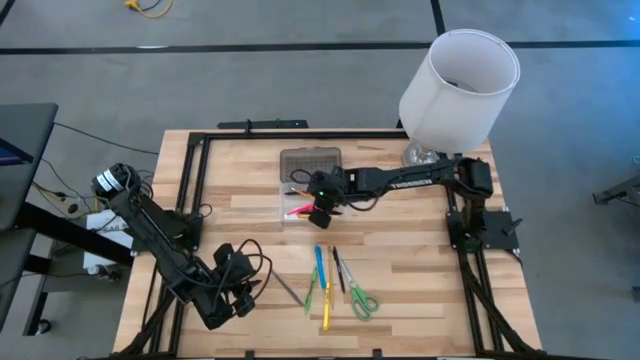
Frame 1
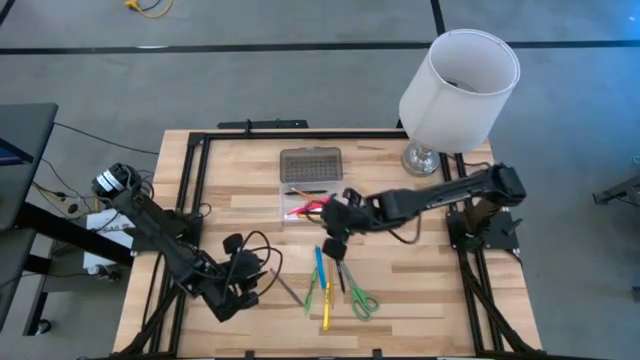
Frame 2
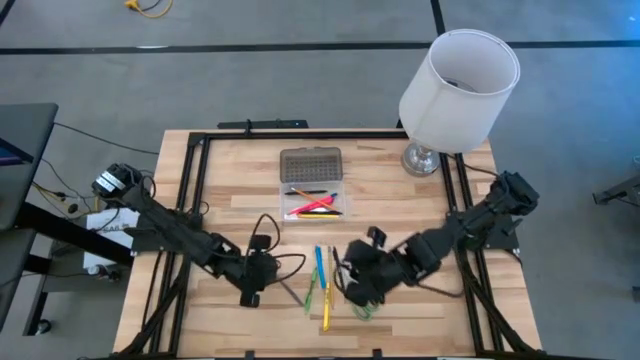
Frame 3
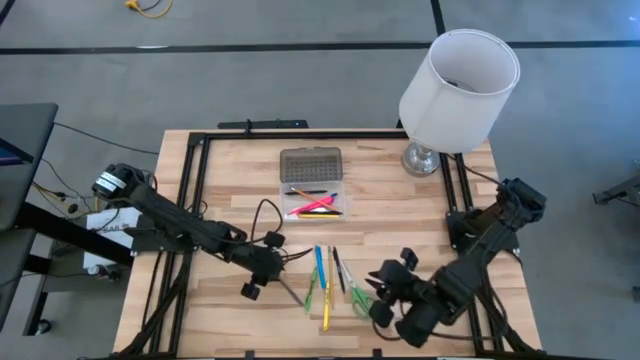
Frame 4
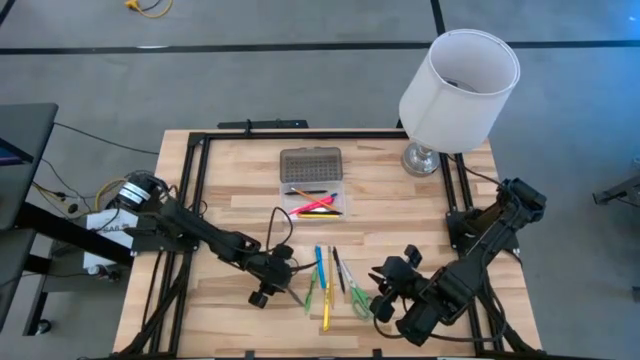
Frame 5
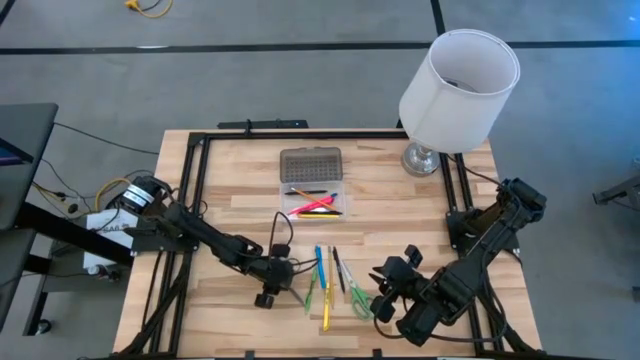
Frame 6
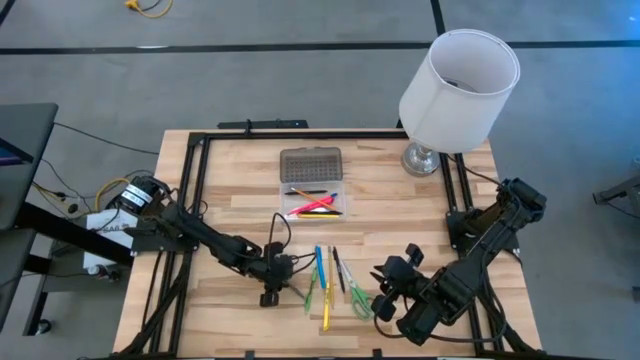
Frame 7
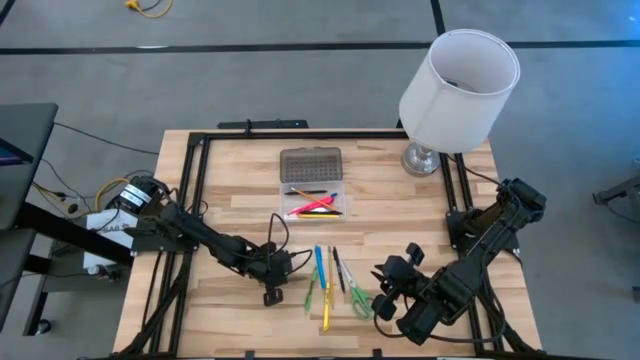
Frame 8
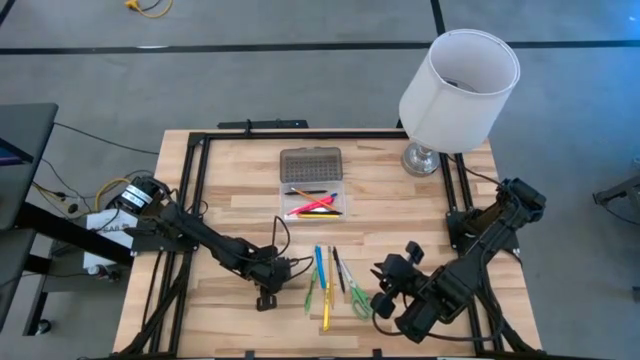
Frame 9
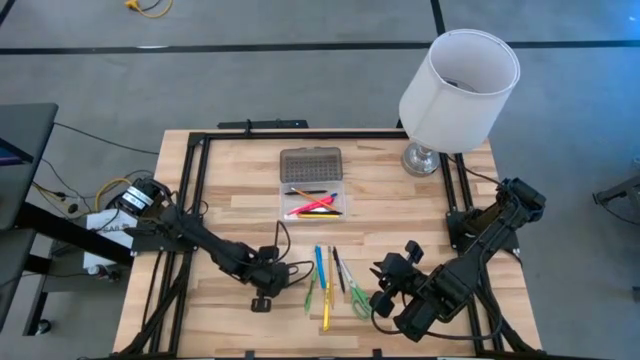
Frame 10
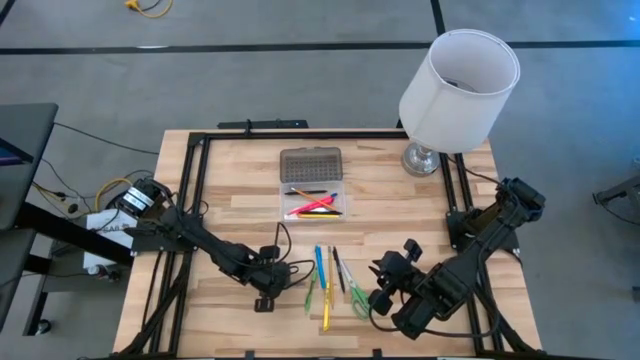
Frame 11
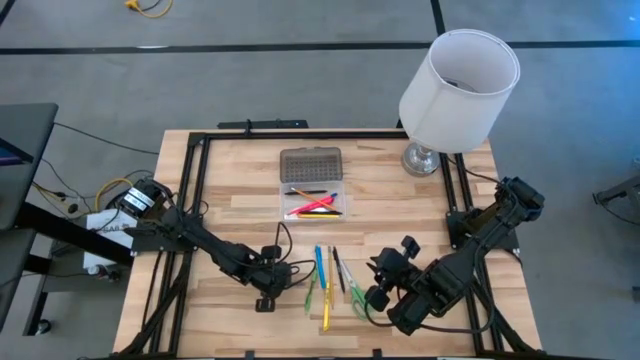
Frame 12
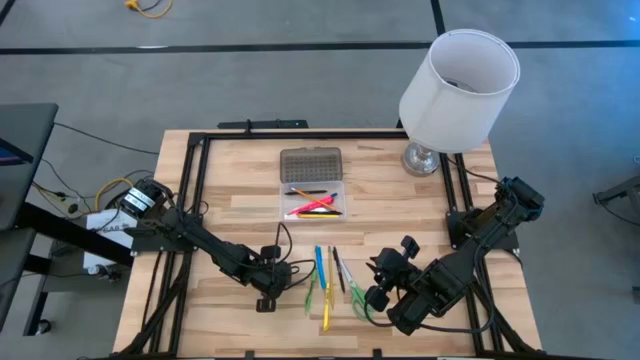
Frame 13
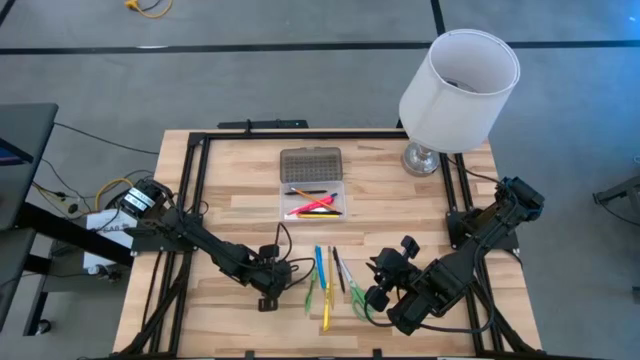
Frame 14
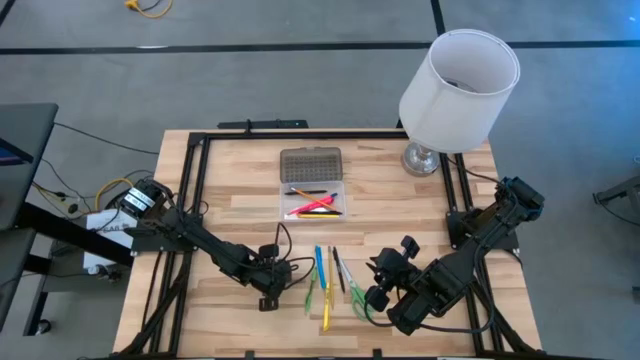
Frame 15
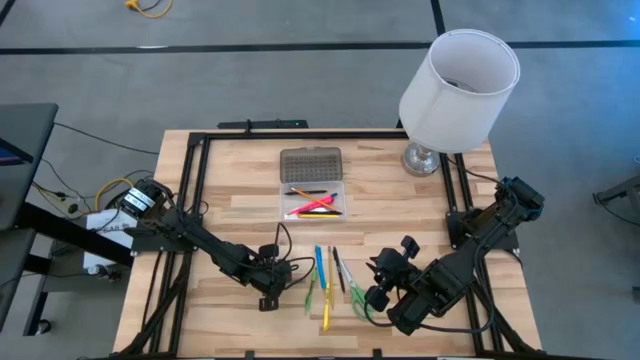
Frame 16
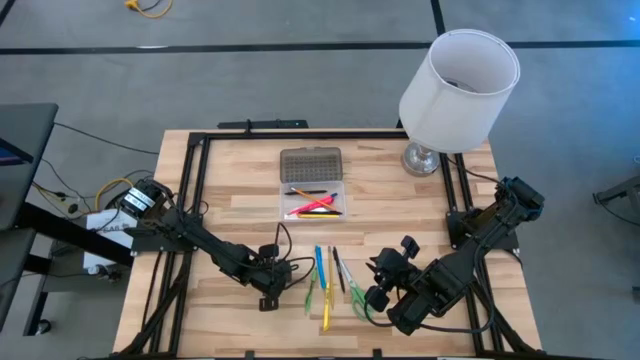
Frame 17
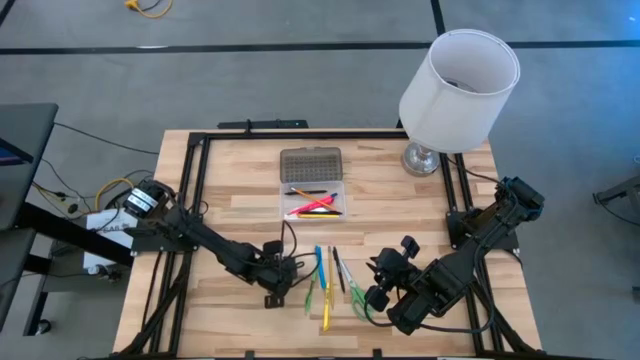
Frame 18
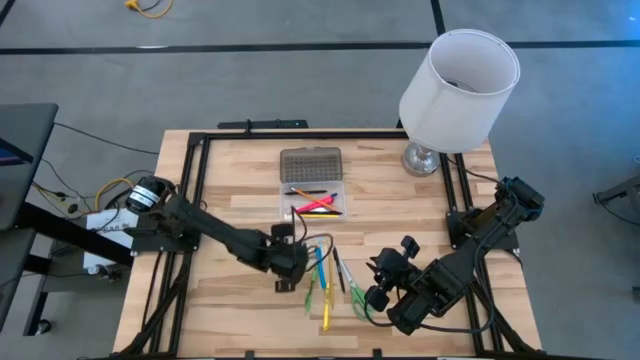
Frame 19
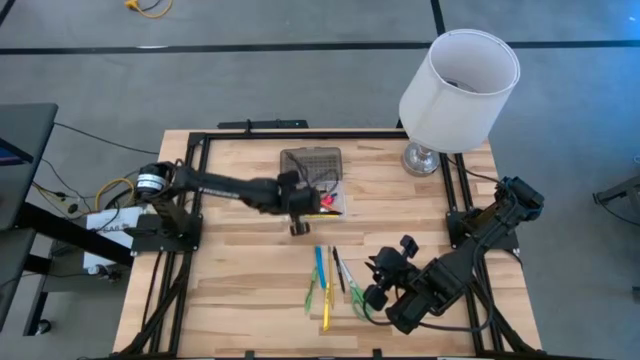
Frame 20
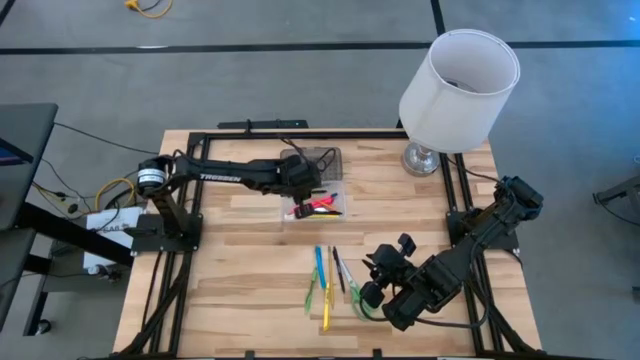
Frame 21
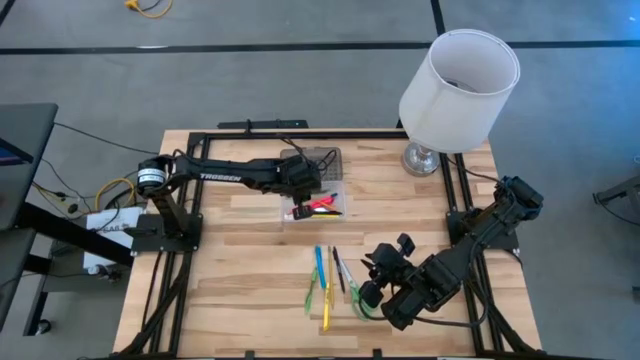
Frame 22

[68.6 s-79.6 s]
Task: Pick & place school supplies into a supply box
Put the black transparent pen into the supply box

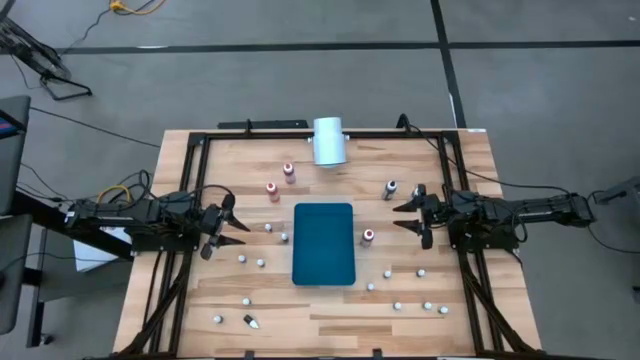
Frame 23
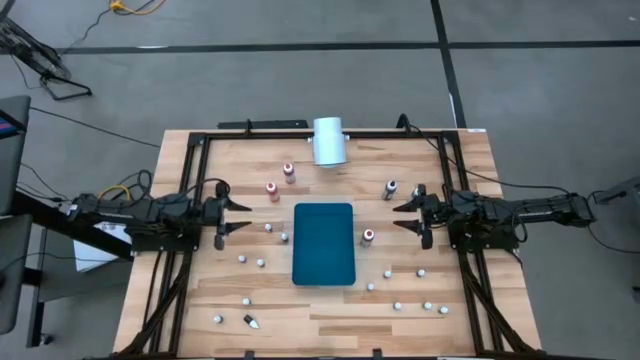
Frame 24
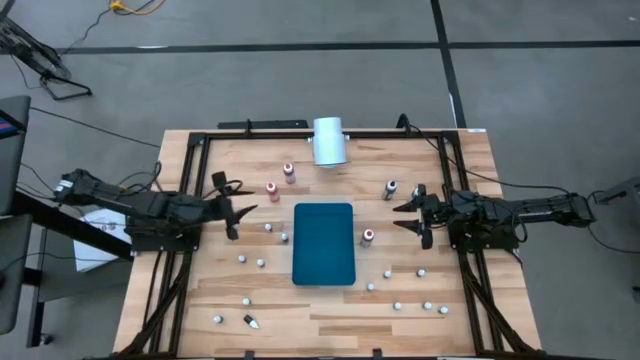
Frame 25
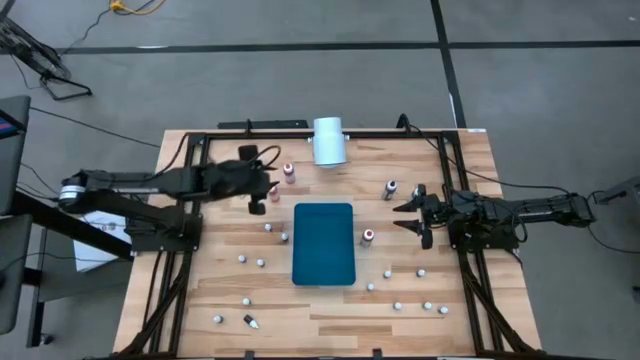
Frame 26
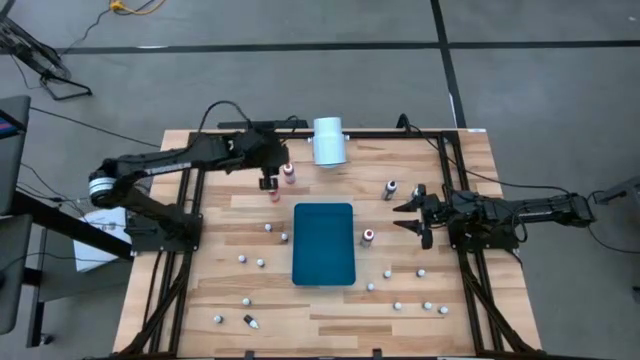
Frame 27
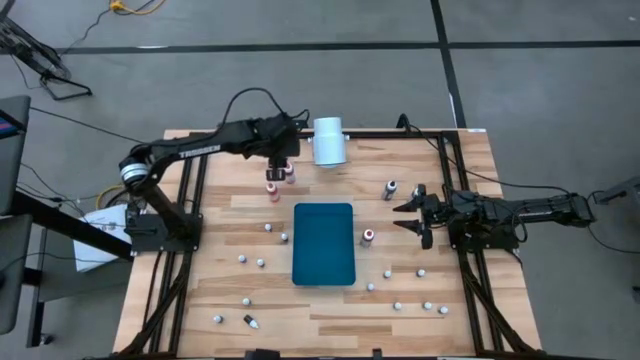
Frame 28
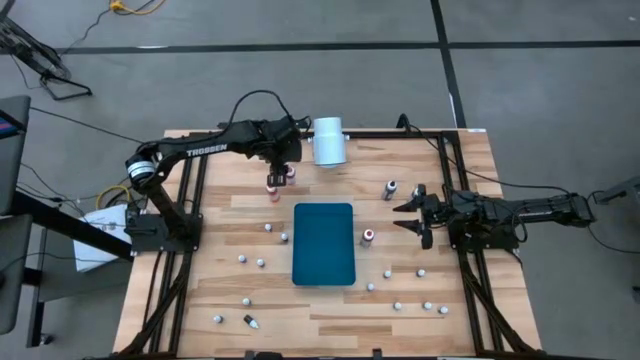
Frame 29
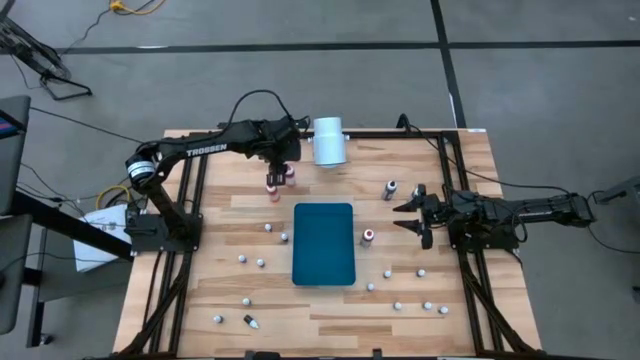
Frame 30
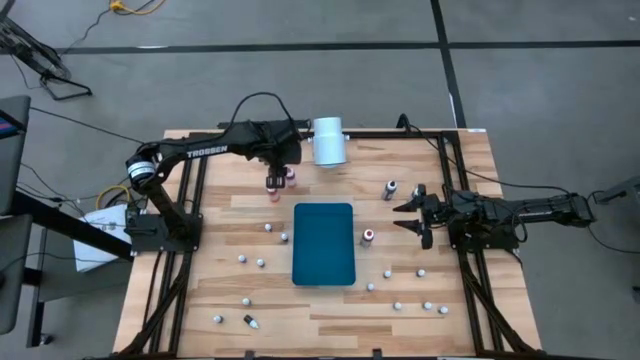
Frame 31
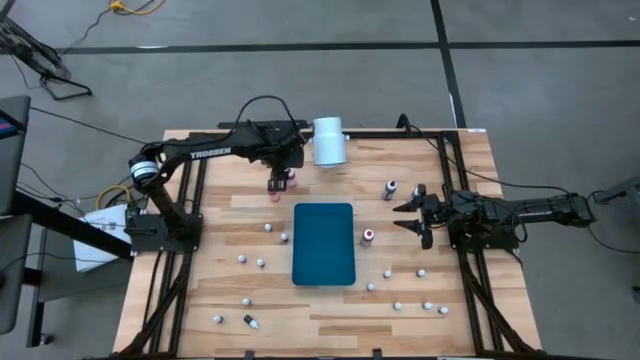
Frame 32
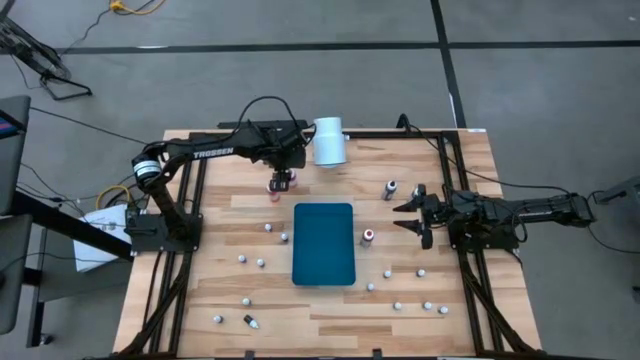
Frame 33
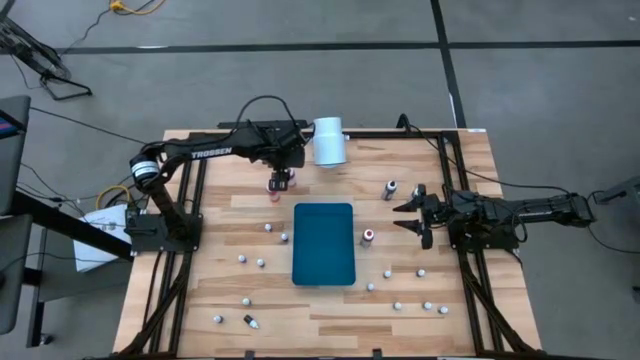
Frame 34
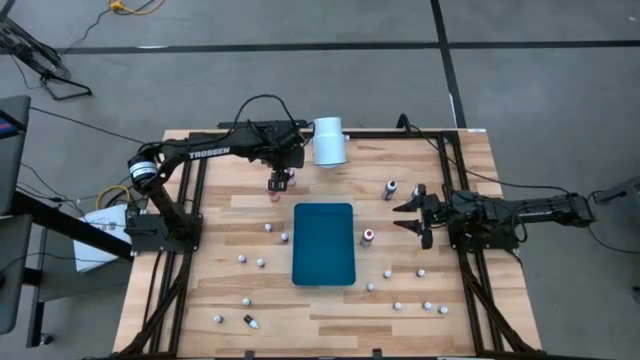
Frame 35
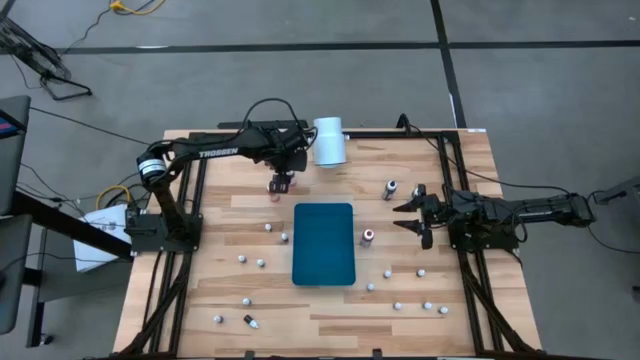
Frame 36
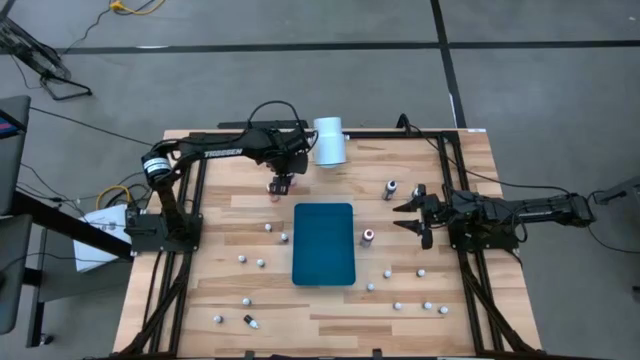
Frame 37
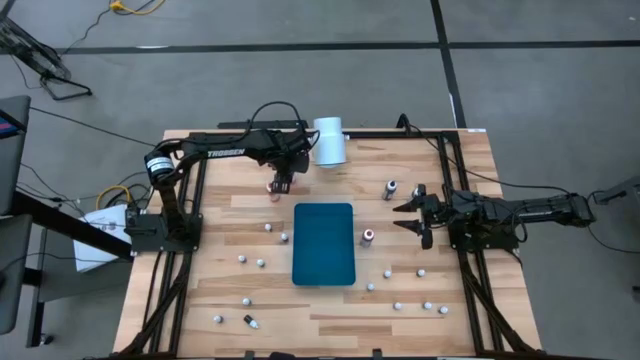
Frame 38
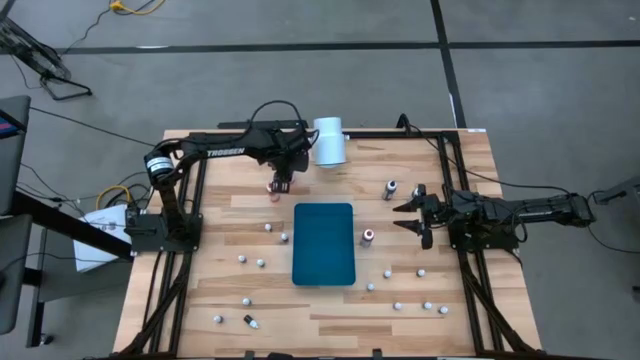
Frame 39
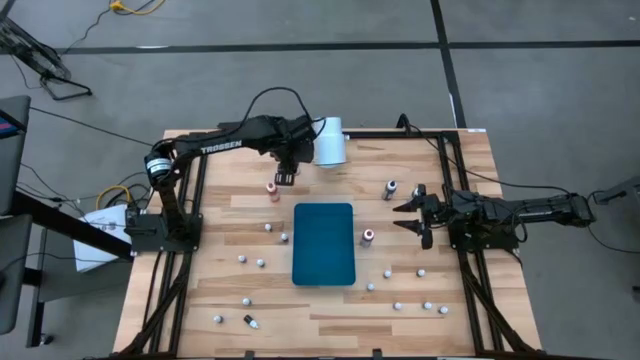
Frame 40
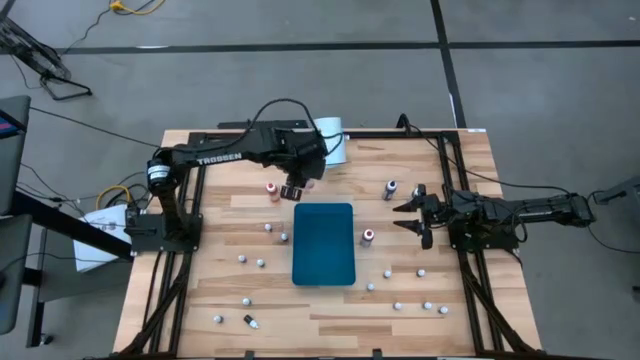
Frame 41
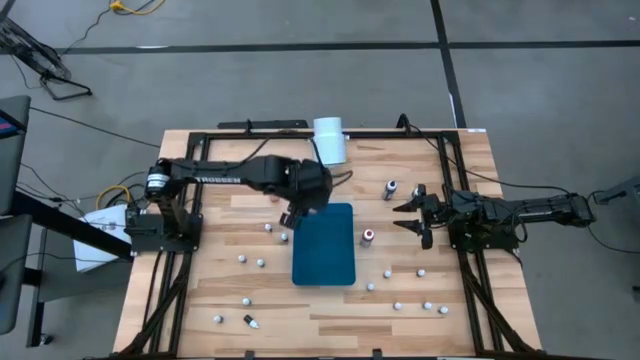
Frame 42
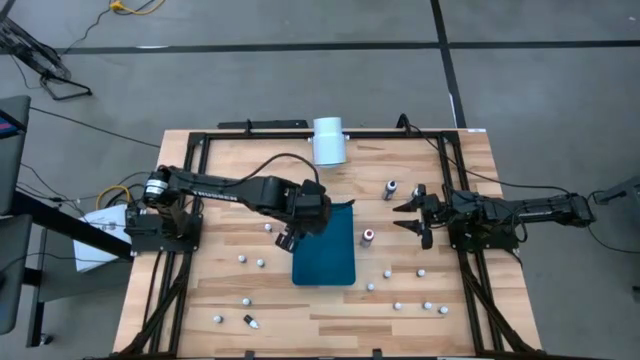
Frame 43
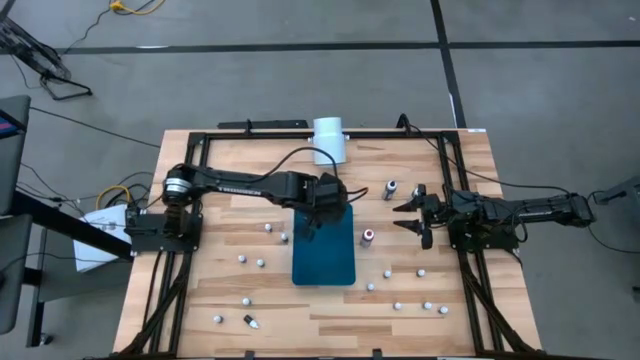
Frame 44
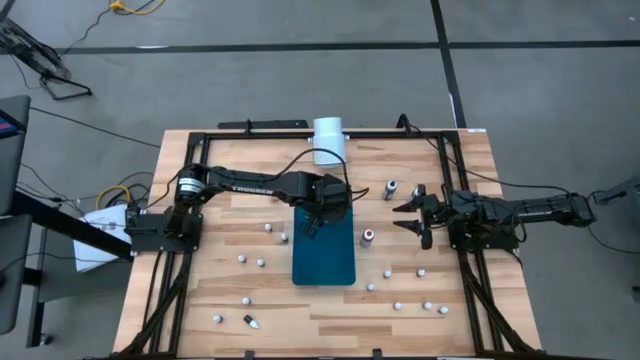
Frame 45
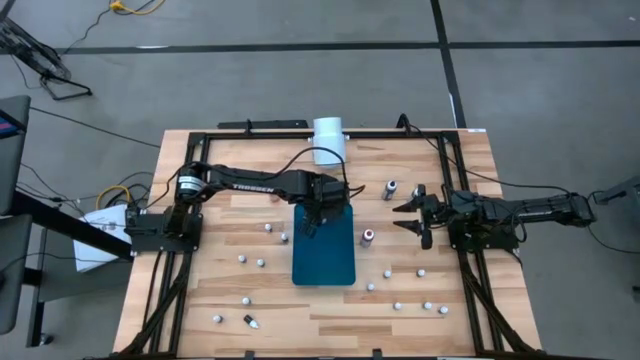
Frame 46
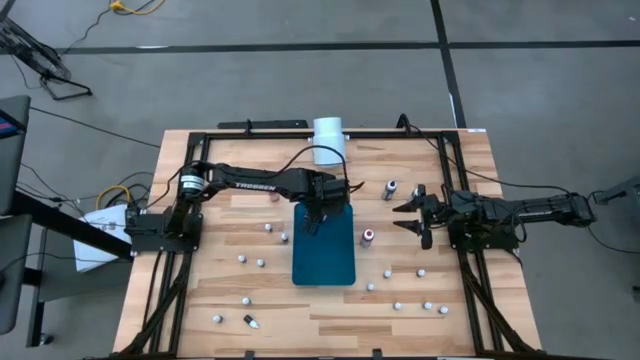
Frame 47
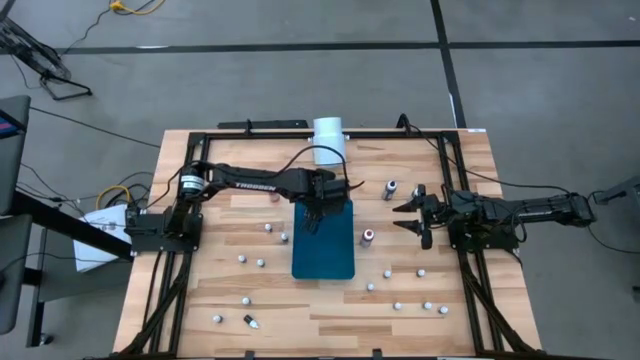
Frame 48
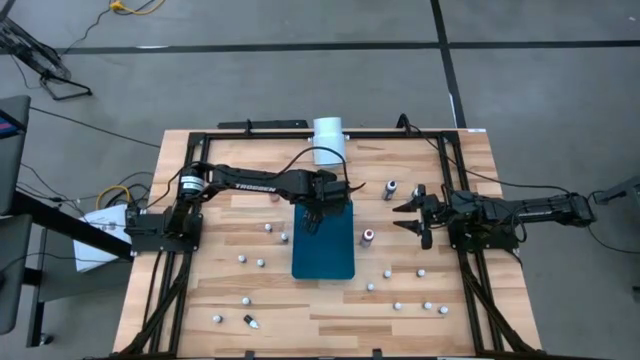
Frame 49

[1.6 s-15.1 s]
Task: Pick & Place food coloring
Put the large pink food coloring bottle into the blue bin
